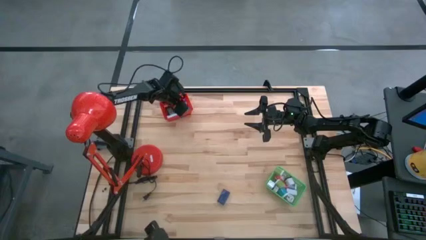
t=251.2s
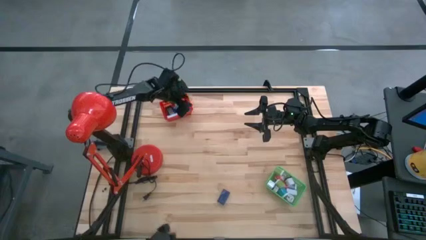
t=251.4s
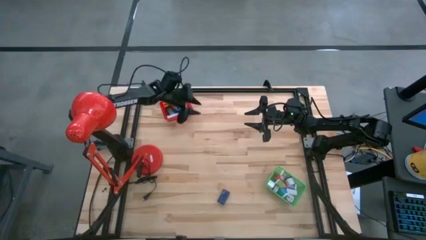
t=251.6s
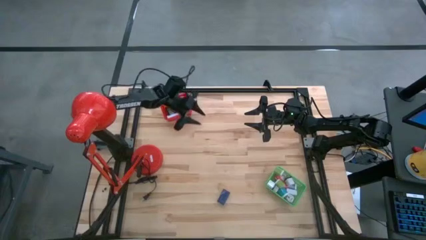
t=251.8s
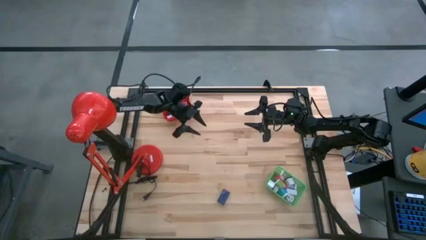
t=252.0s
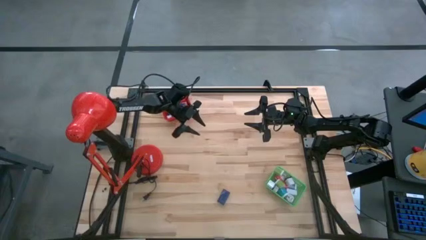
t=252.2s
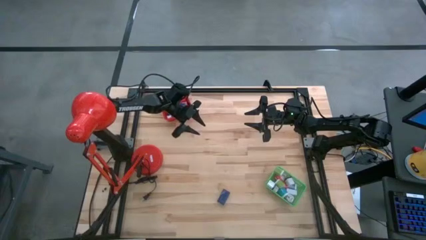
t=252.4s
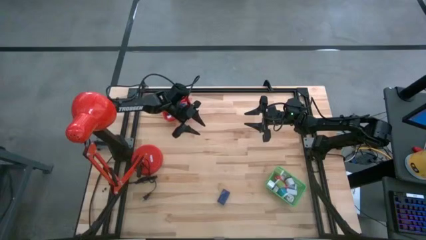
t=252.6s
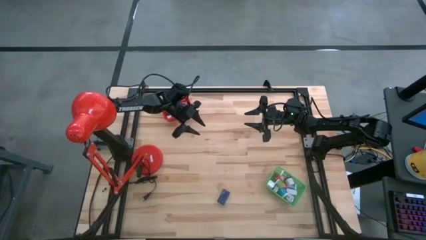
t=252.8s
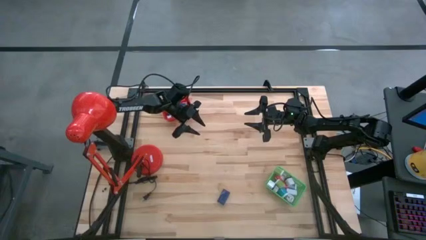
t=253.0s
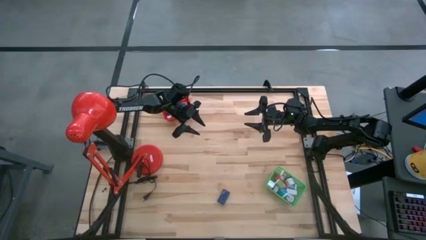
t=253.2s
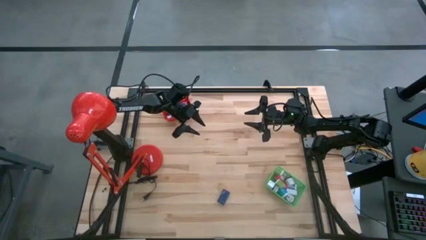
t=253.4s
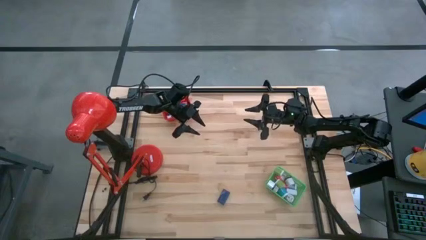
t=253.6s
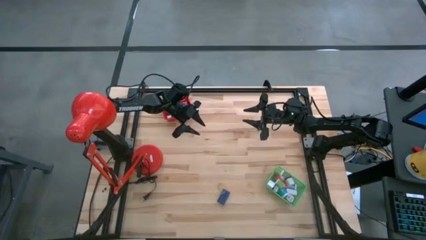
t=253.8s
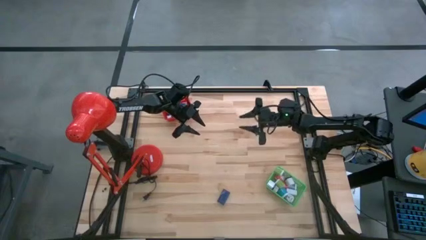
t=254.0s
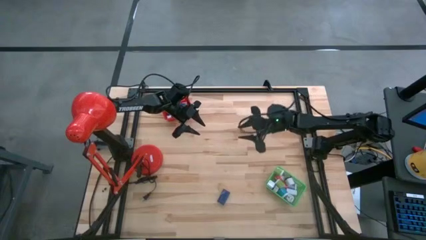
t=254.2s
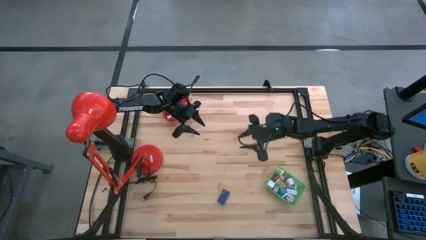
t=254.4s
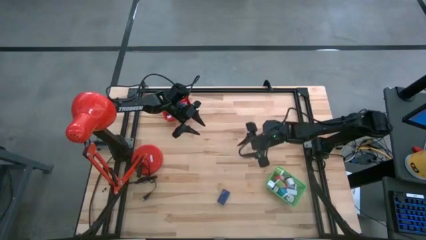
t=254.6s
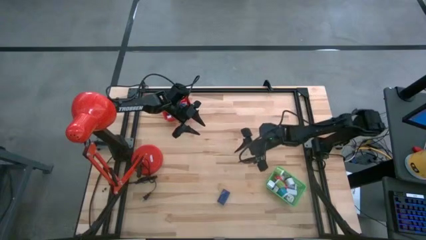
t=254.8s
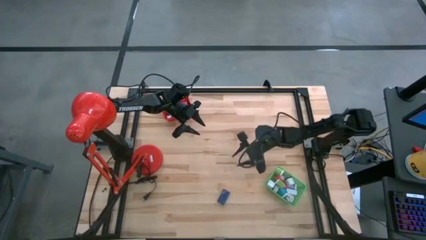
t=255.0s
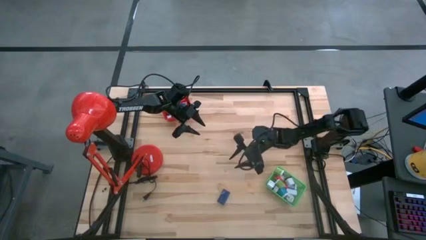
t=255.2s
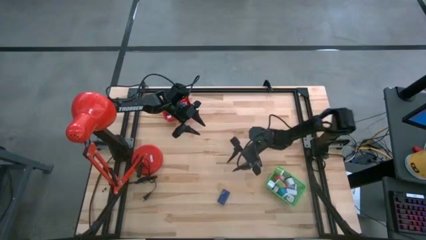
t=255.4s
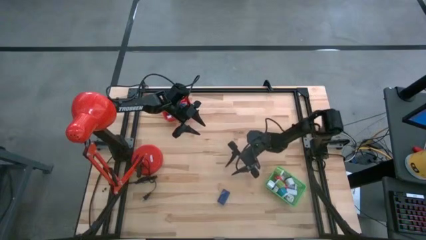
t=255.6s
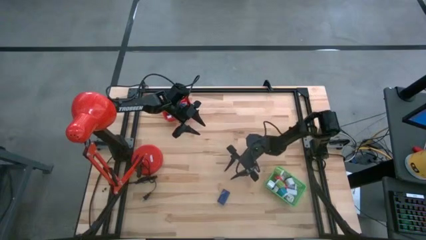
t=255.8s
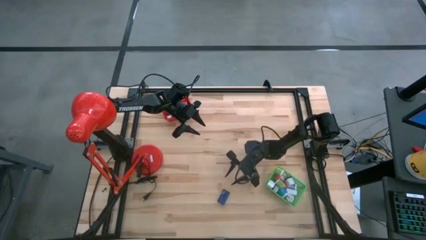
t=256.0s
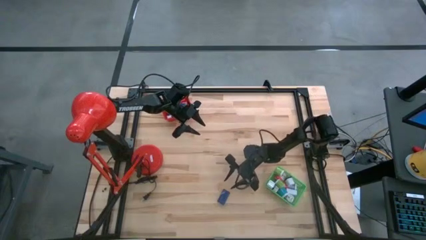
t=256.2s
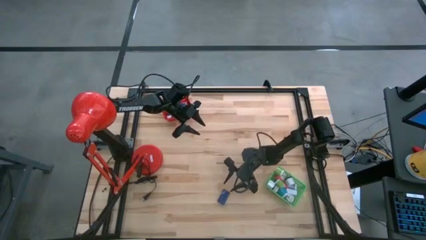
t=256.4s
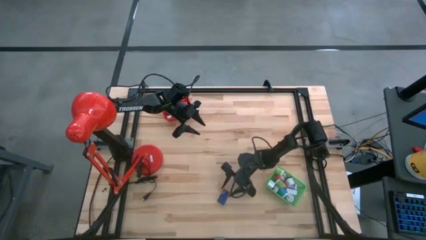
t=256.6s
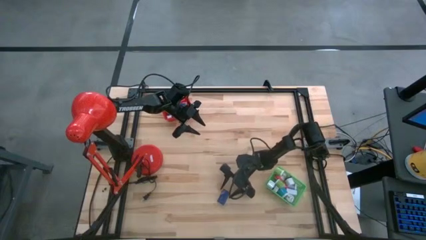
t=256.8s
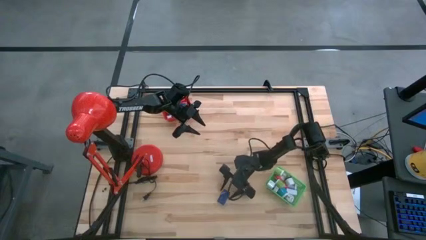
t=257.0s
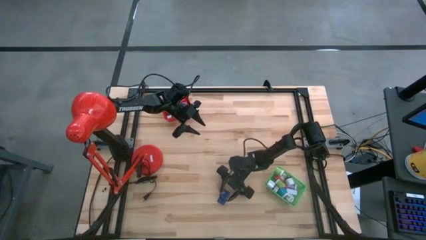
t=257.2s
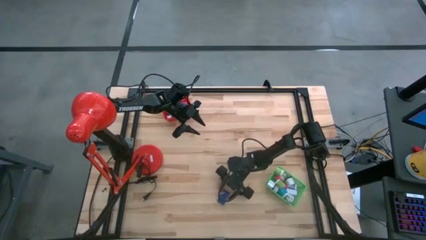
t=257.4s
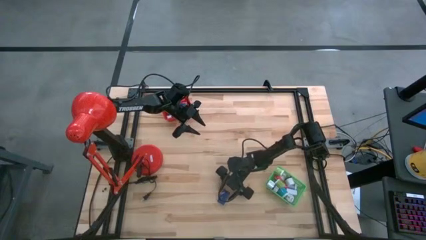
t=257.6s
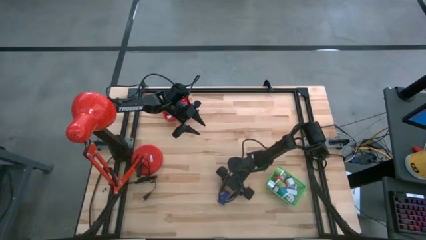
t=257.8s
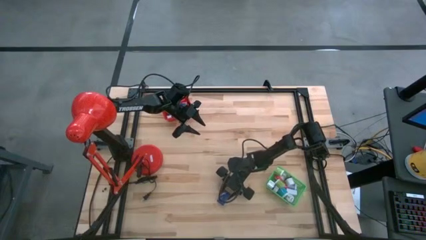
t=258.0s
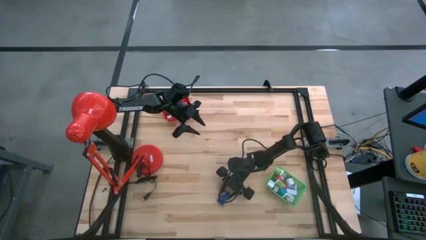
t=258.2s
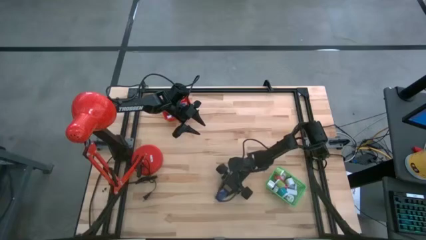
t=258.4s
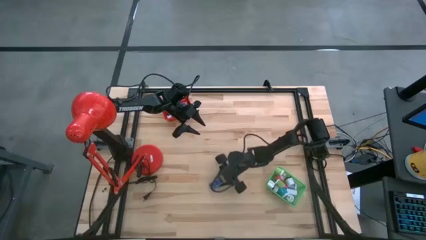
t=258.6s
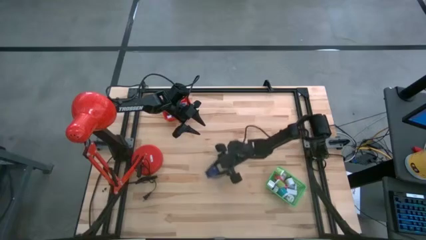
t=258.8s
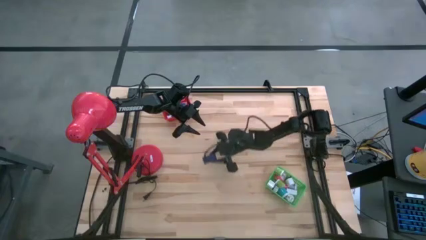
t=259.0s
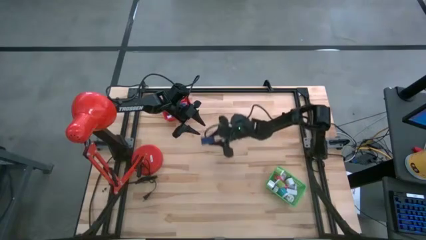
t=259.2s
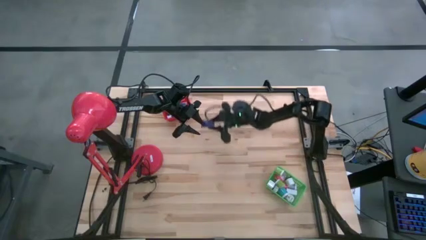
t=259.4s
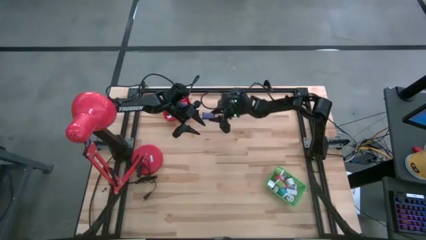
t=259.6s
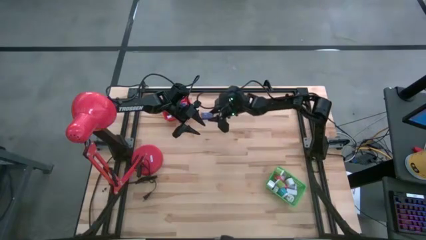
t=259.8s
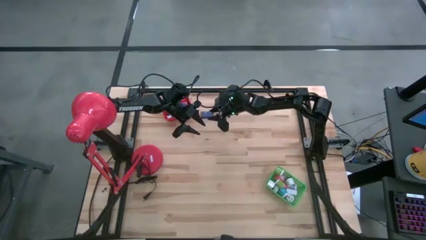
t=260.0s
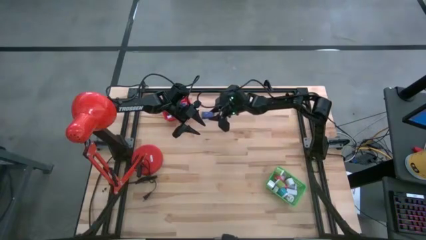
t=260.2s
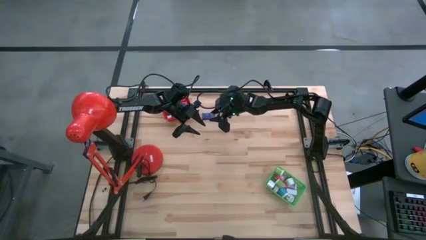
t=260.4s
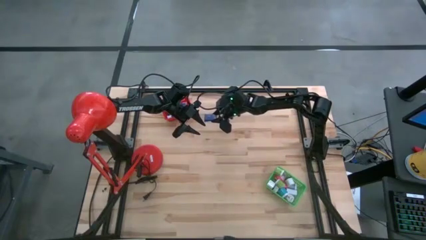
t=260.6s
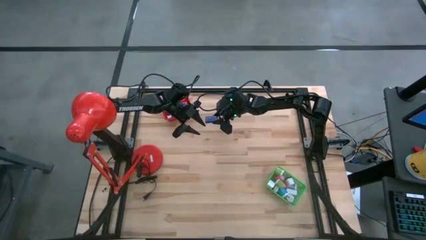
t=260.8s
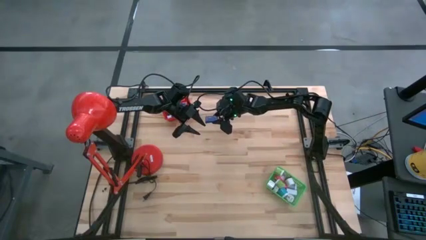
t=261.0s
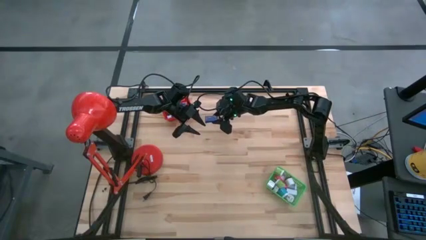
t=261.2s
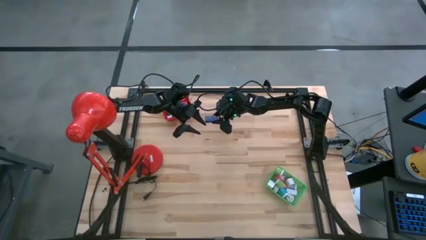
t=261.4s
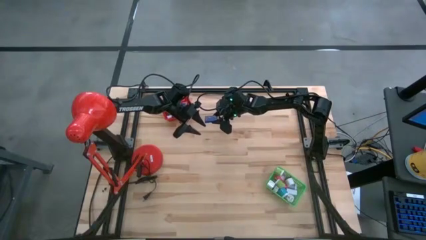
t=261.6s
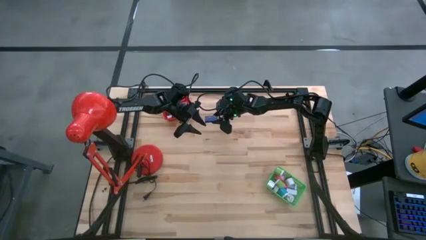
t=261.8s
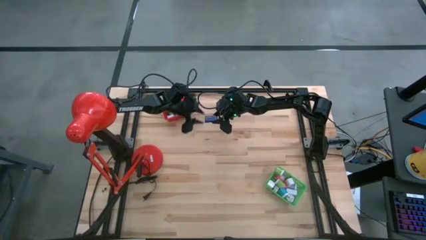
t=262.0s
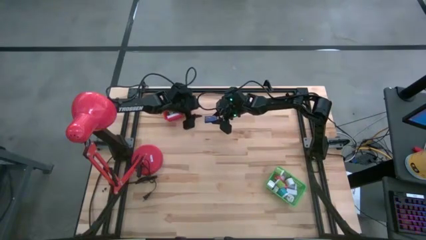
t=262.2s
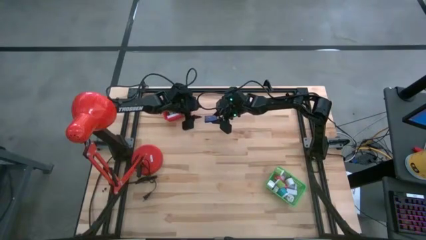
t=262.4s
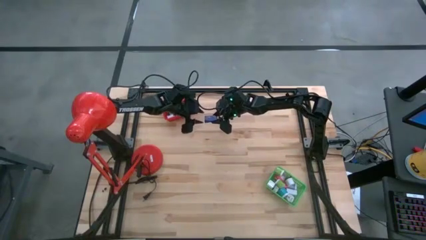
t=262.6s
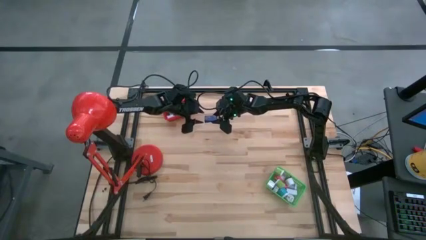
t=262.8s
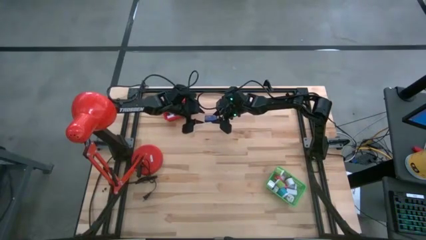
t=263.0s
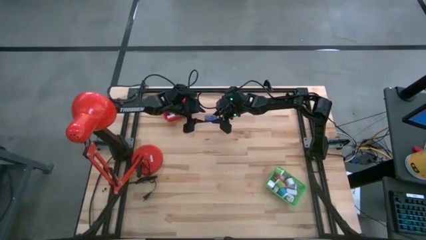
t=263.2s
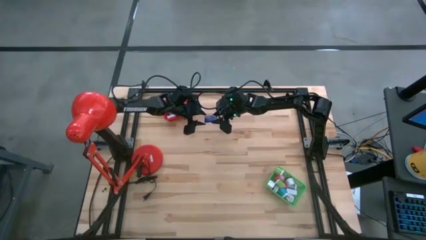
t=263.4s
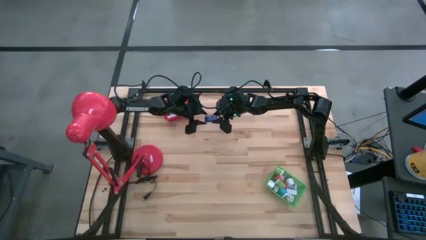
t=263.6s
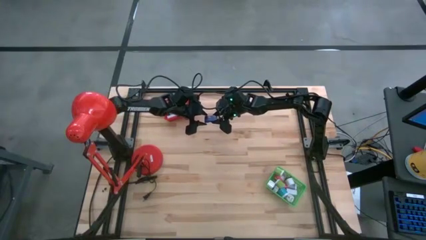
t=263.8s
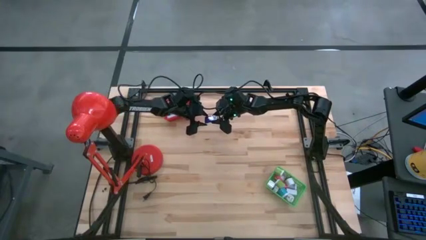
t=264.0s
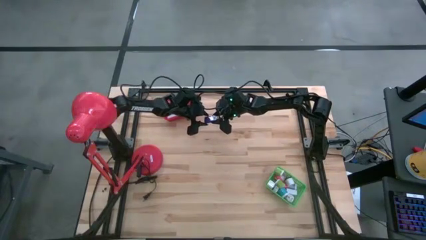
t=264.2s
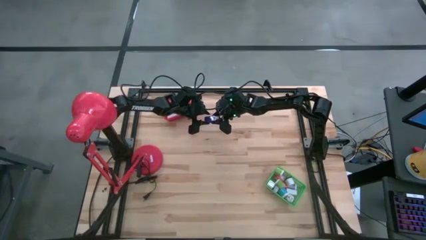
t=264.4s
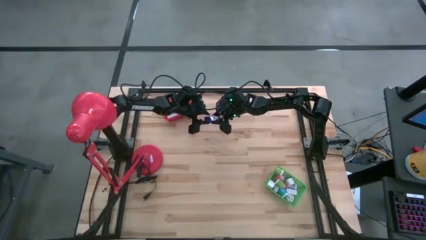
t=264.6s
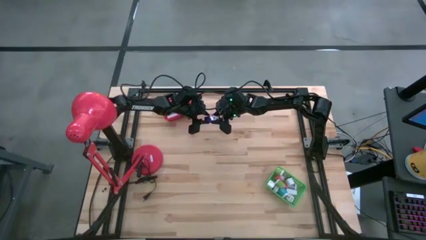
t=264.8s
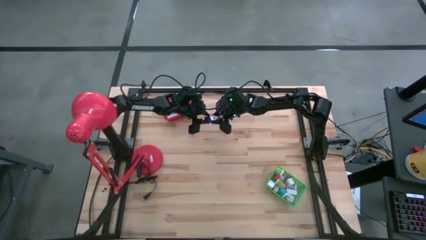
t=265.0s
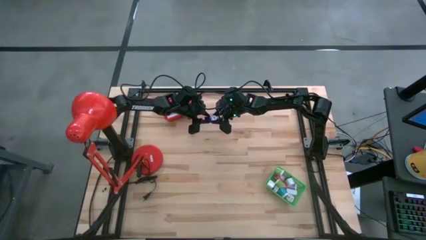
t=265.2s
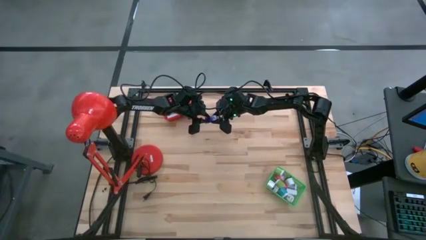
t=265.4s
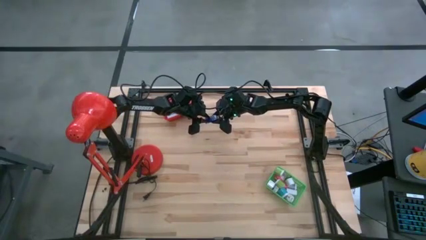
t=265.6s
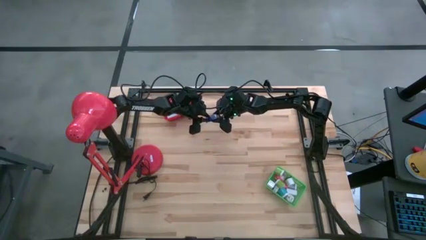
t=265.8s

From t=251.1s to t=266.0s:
Task: Pick & Place Office items
Put the dark blue digital clock into the red bin

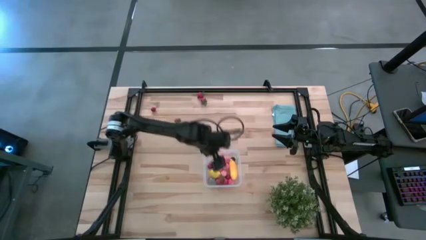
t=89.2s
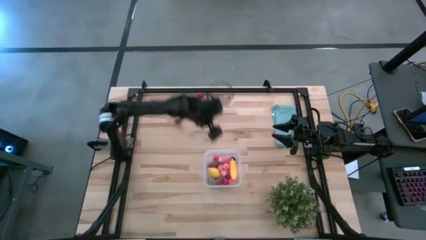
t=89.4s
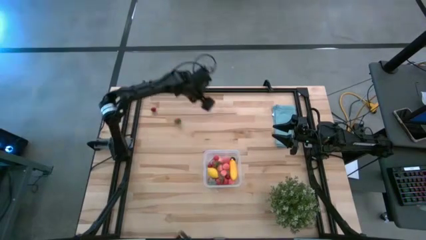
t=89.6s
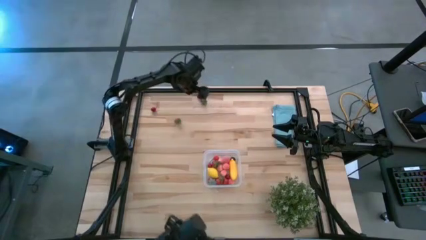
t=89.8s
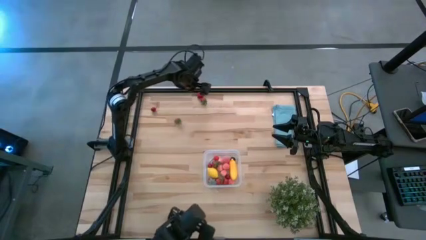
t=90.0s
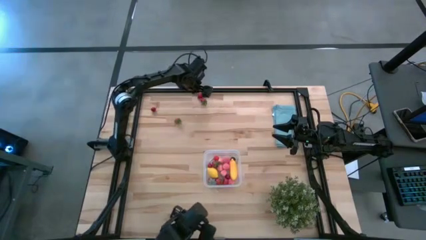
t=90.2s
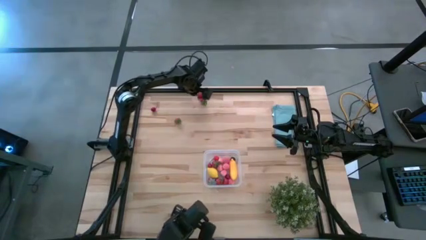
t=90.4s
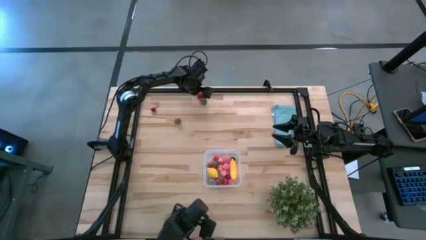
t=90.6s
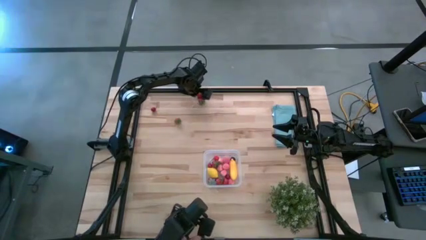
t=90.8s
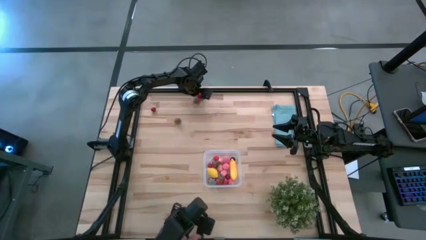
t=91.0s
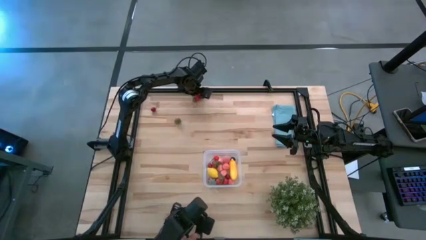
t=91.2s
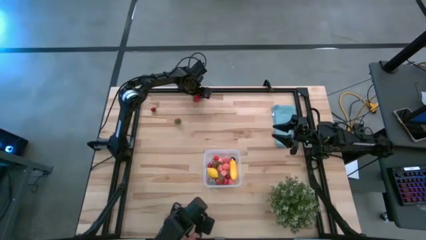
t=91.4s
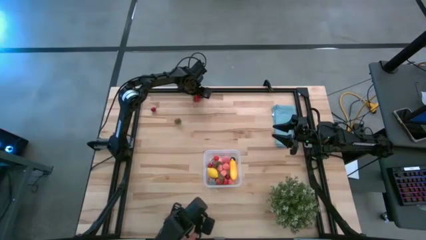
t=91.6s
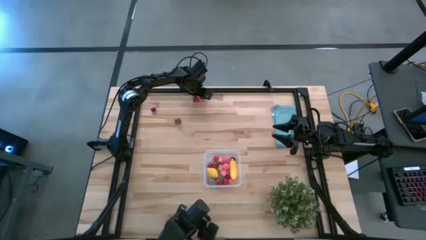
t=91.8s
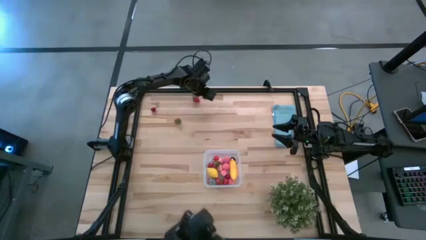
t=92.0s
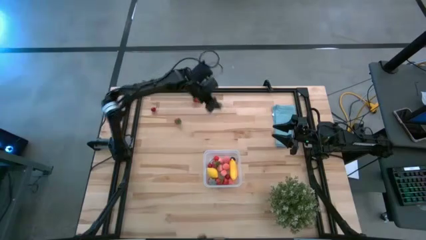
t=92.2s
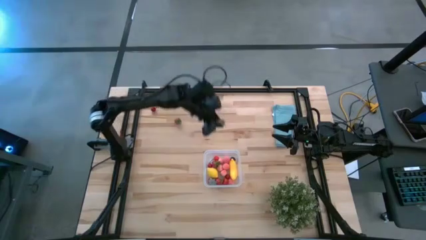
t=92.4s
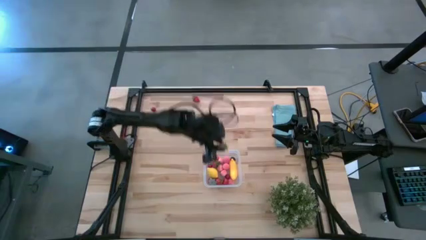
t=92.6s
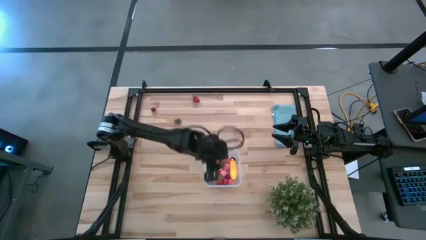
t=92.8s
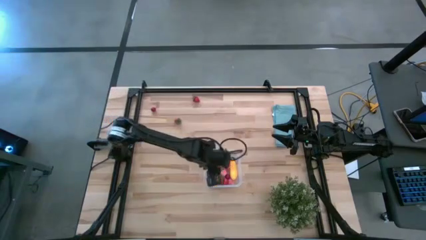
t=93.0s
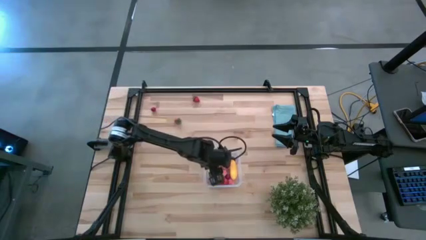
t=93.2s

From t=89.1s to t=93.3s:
Task: Pick and placing Produce into tupperware
Put the red strawberry into the transparent bin
